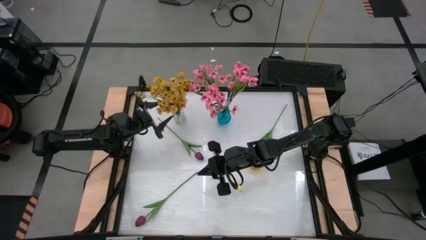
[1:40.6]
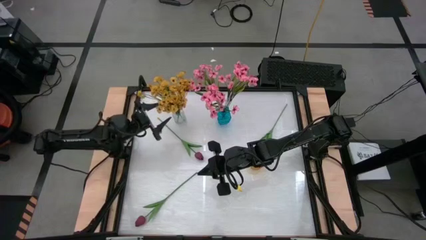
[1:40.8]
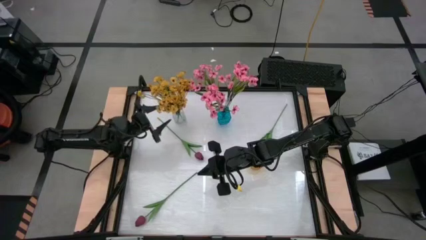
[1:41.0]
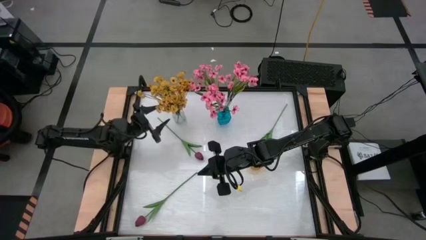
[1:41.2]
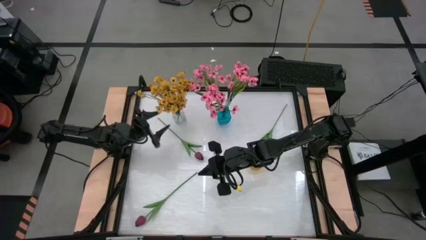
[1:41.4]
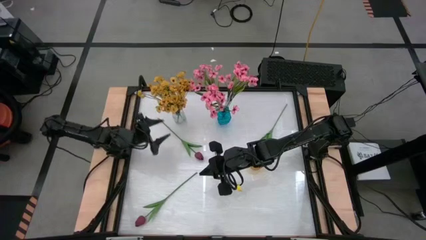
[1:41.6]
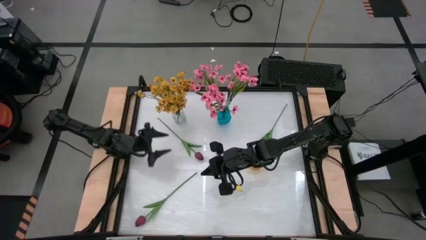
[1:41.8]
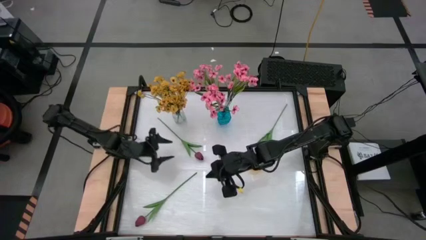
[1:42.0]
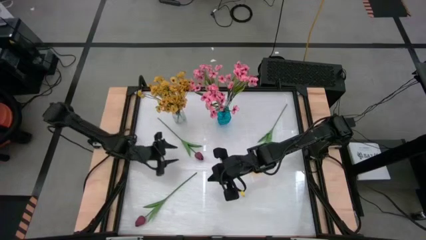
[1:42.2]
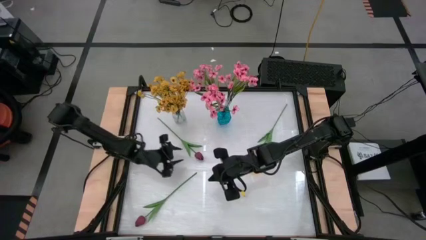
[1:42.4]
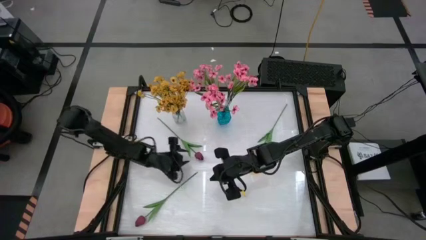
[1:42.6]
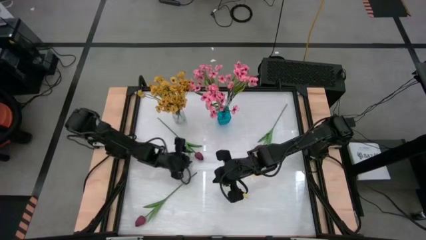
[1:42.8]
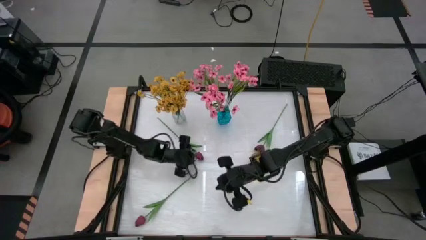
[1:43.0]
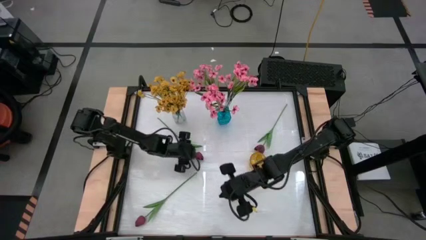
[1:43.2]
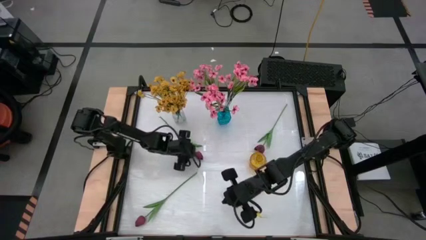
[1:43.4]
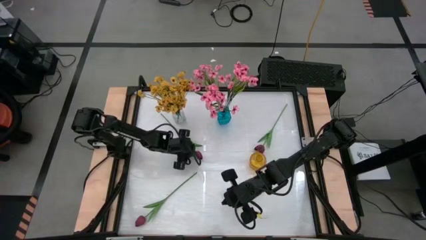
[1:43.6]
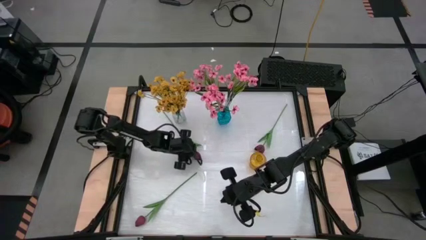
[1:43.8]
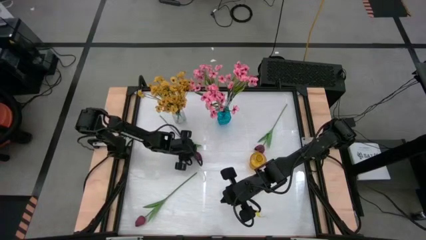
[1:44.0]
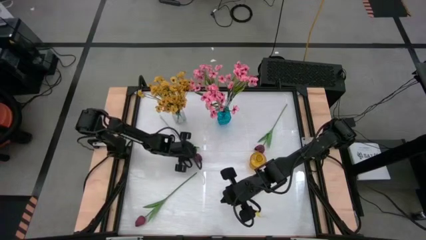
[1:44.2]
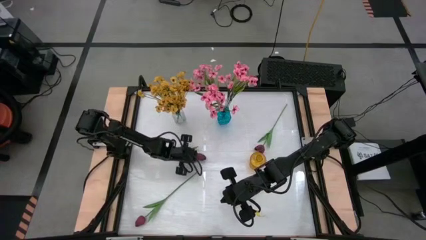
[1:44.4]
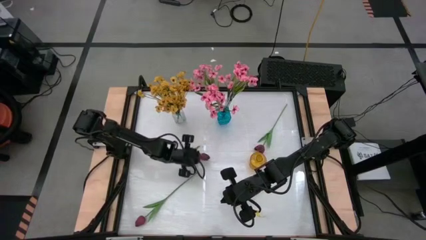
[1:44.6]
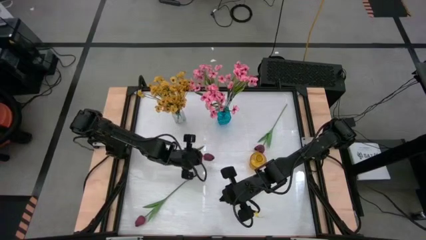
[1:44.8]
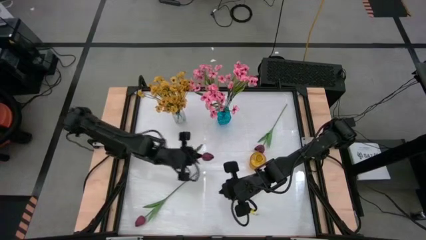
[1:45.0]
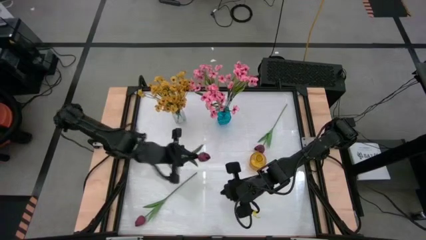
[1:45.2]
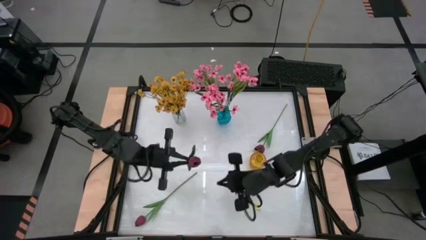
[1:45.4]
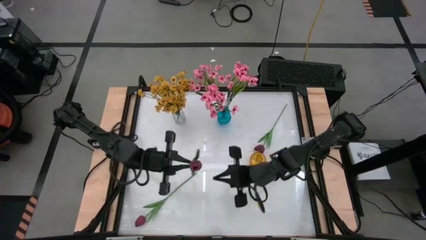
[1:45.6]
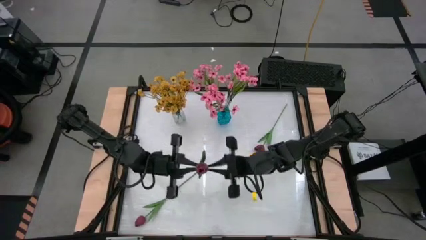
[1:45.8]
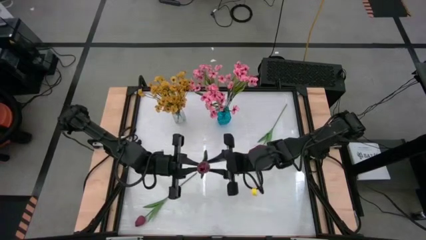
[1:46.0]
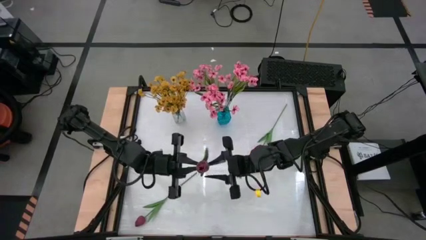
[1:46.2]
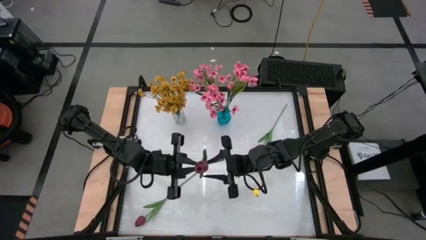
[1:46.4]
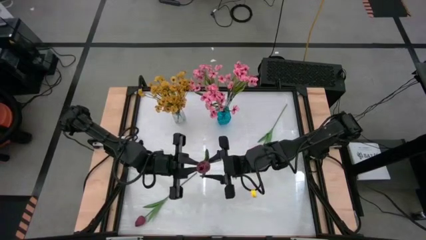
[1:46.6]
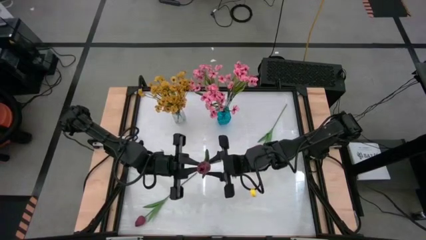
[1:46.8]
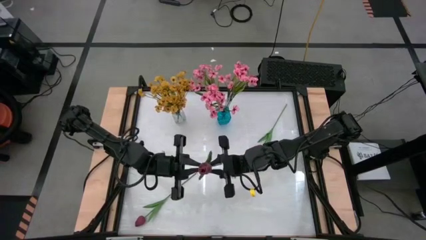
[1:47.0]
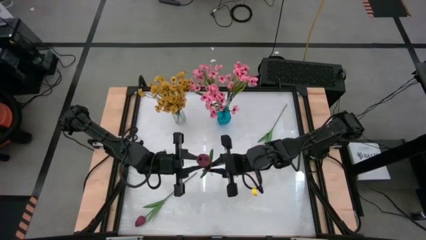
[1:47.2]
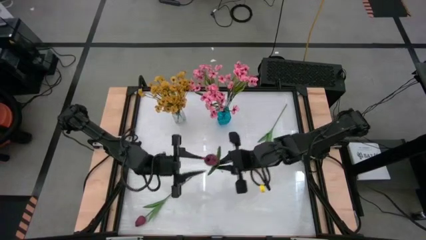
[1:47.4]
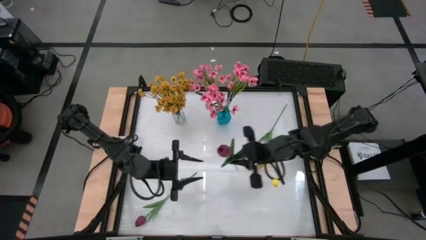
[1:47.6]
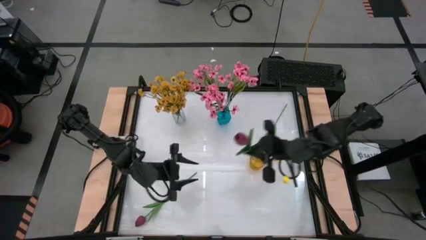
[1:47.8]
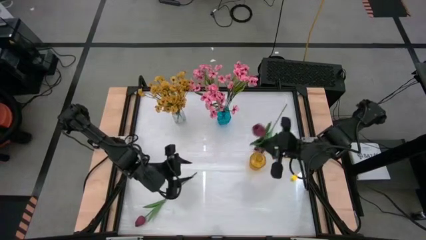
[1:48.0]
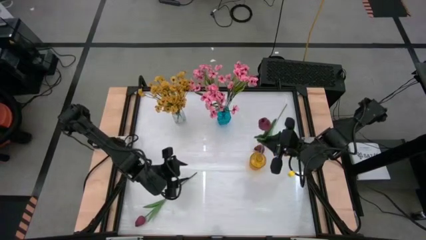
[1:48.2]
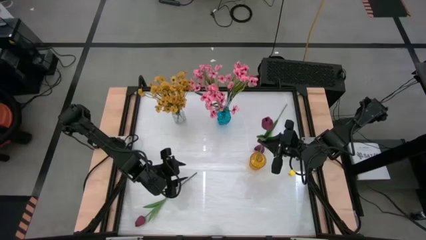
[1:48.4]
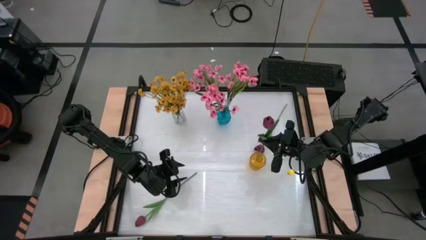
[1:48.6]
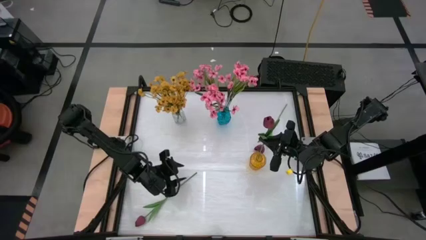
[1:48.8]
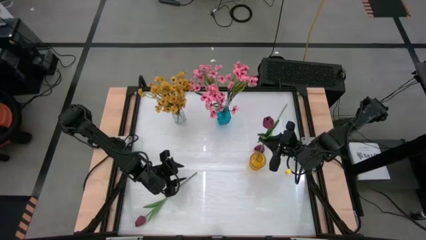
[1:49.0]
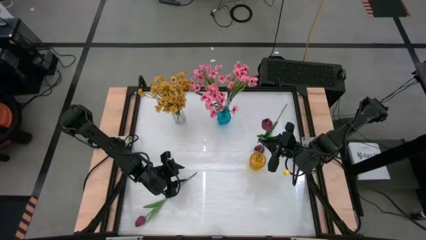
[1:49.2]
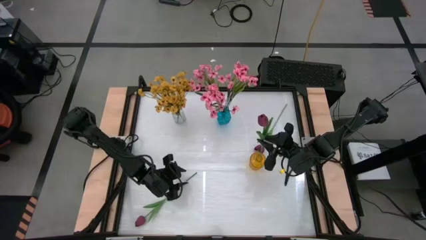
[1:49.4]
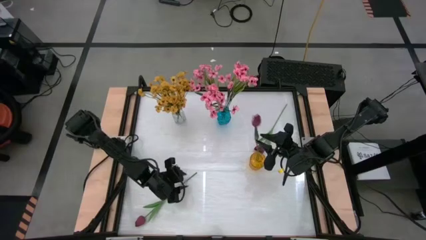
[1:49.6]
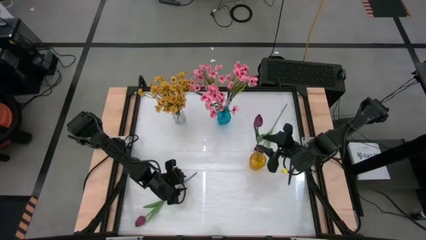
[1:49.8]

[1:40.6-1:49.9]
Task: Sort flowers into vase by color
Put the top left red flower into the yellow vase

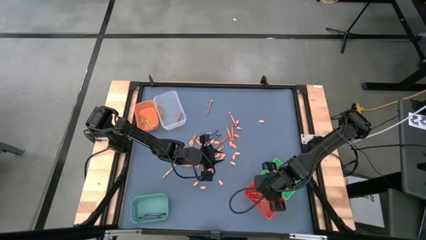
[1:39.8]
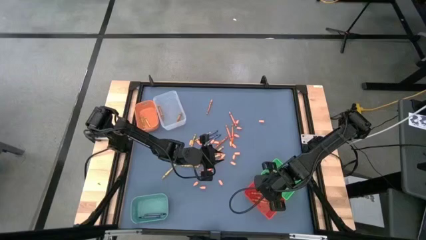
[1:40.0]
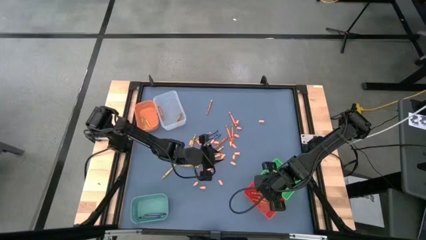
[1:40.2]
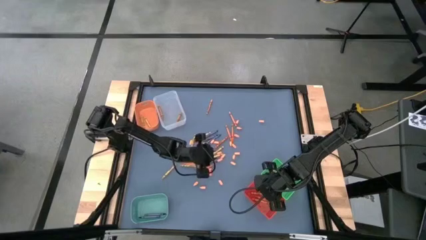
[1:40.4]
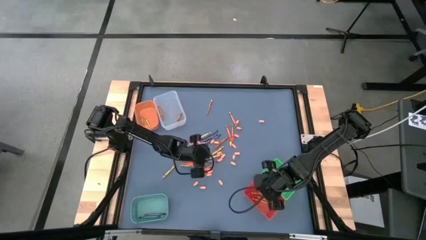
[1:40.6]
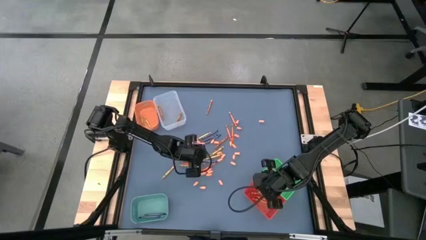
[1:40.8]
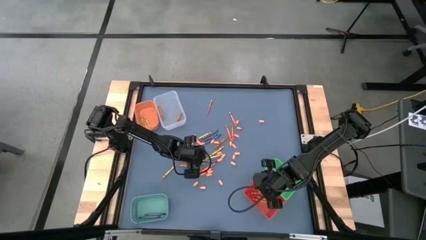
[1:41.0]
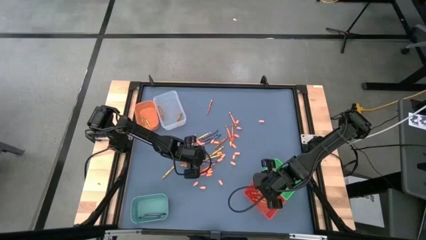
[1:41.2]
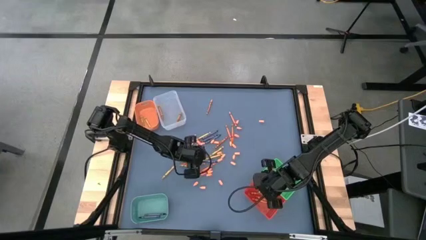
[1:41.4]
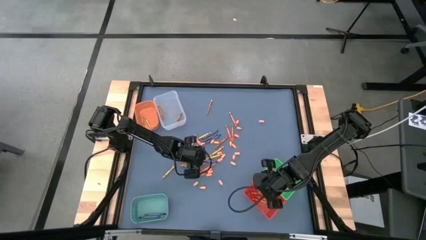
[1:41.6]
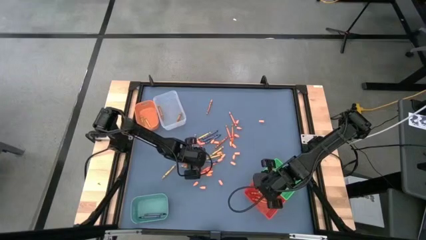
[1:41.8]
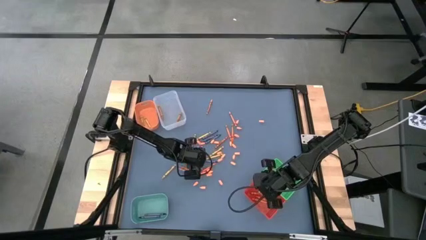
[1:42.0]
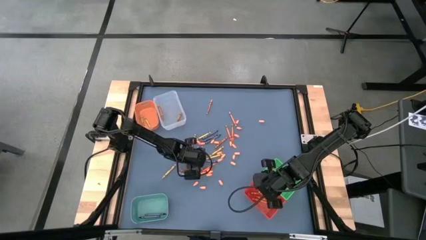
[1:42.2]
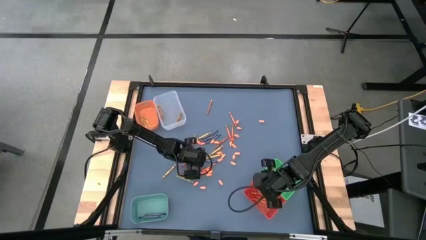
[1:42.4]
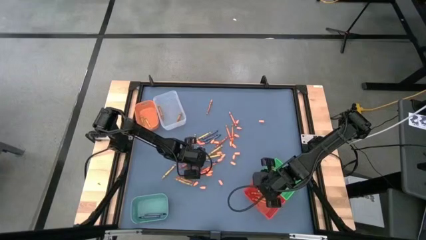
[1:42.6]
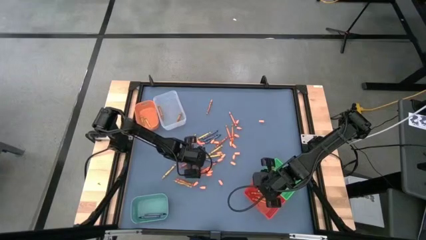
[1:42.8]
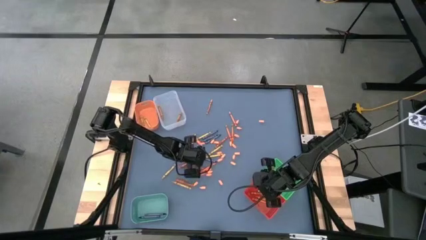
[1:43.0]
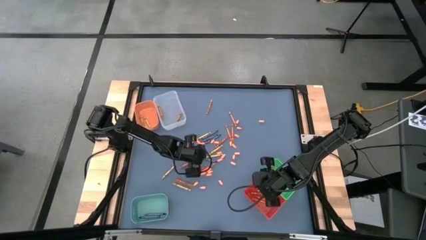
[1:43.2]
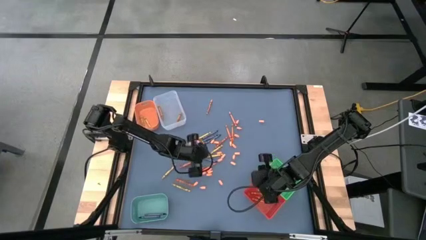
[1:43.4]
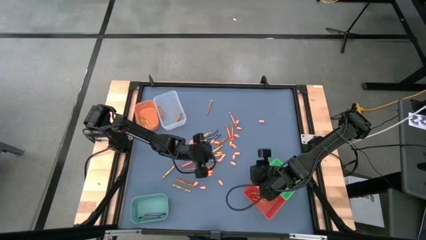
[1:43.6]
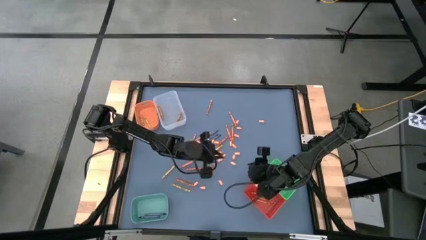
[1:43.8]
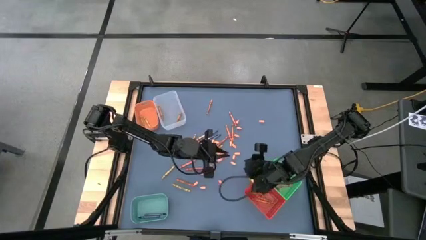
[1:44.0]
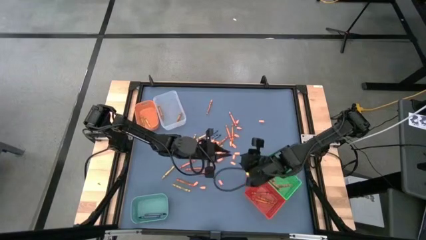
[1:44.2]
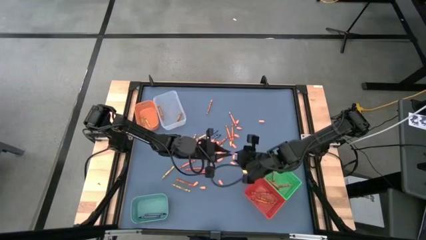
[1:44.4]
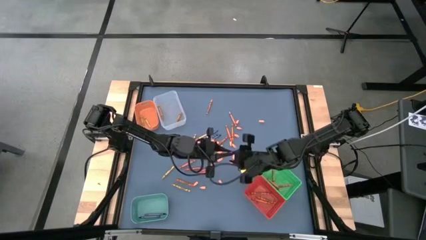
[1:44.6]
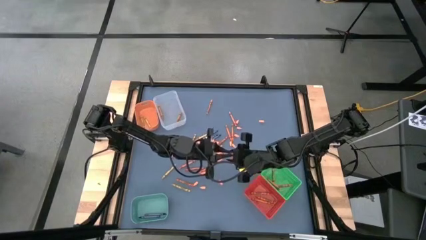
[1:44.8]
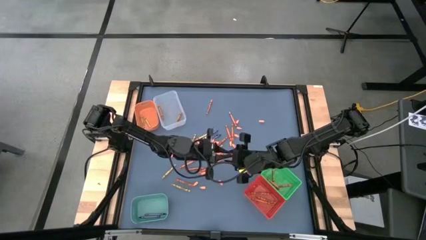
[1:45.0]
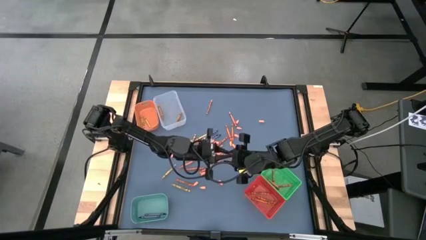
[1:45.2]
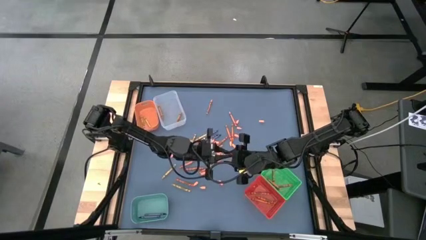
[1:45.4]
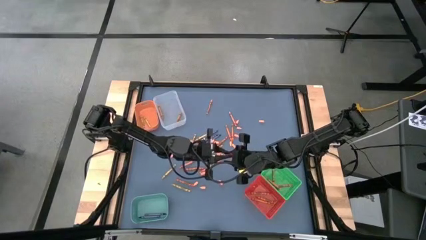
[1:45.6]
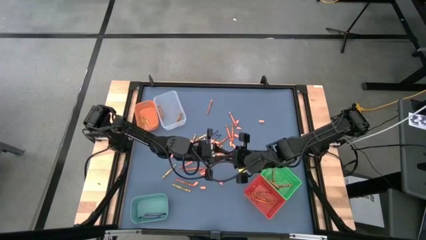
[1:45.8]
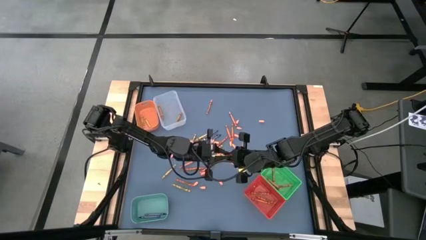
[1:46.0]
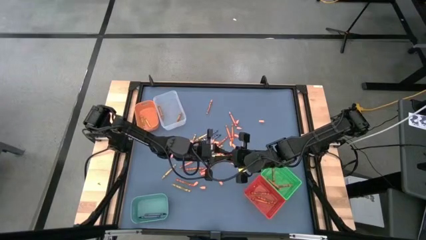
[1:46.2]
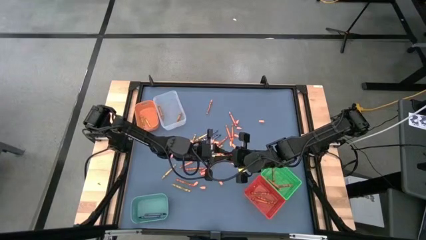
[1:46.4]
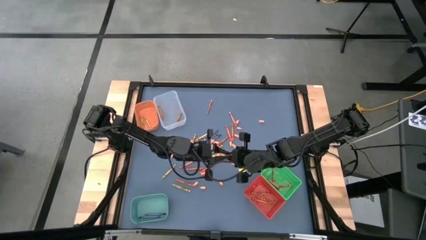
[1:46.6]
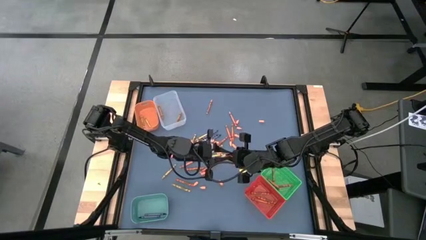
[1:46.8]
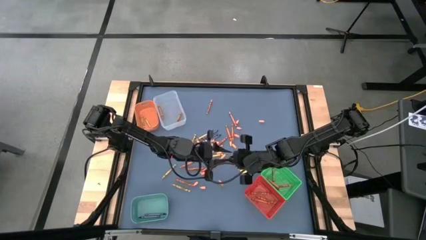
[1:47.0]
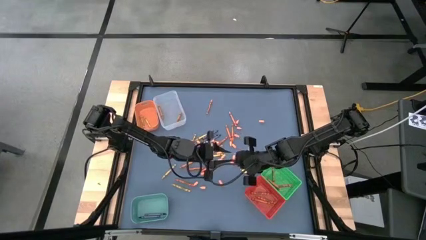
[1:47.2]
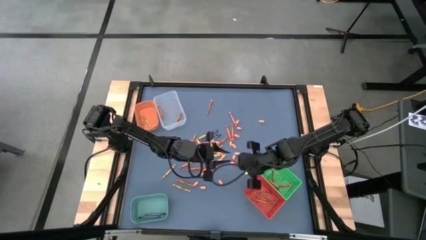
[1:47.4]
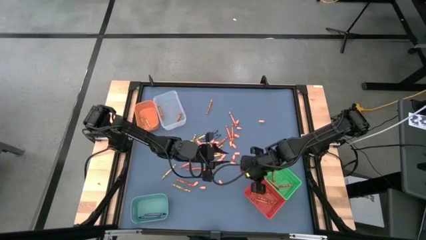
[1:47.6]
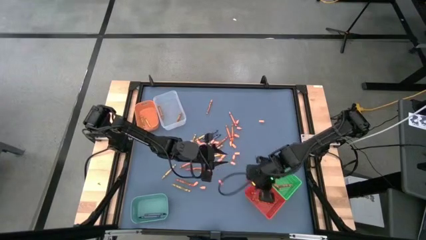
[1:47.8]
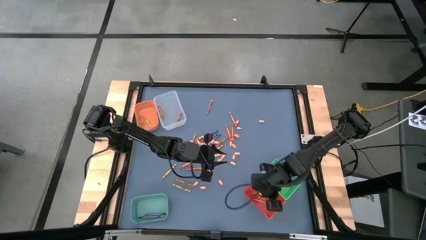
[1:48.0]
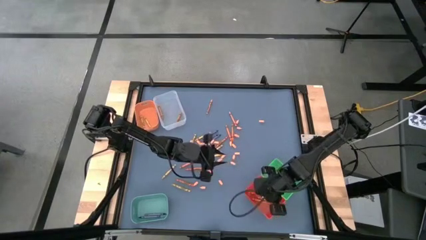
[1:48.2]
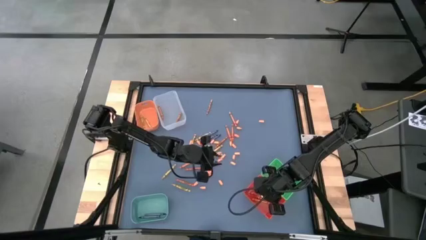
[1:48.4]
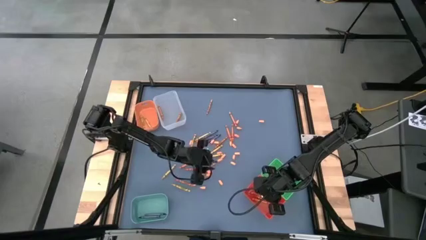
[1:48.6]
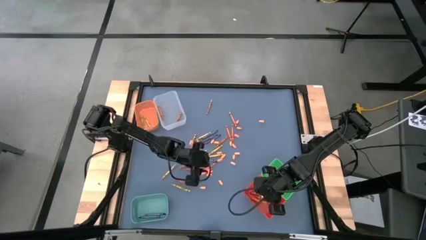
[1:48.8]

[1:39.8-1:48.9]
Task: Sort crayons
Put the red crayon into the red bin
